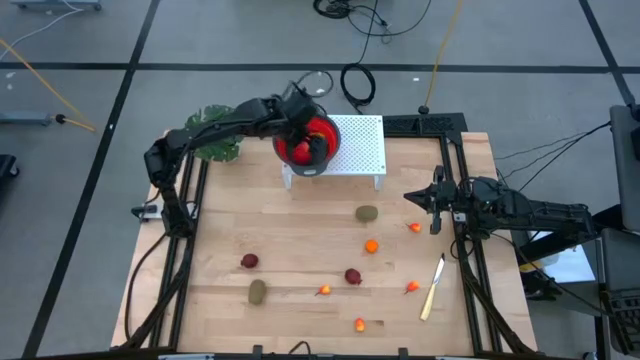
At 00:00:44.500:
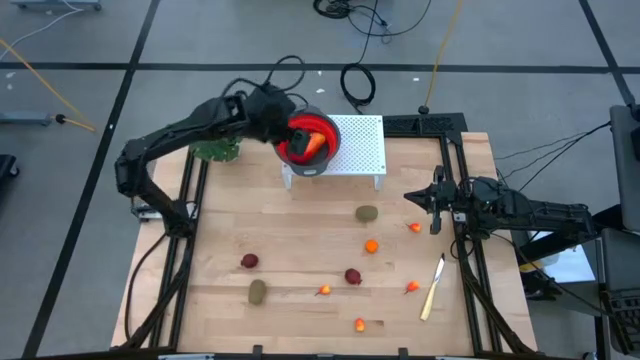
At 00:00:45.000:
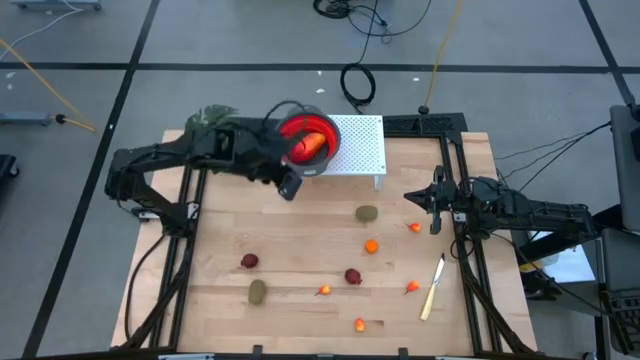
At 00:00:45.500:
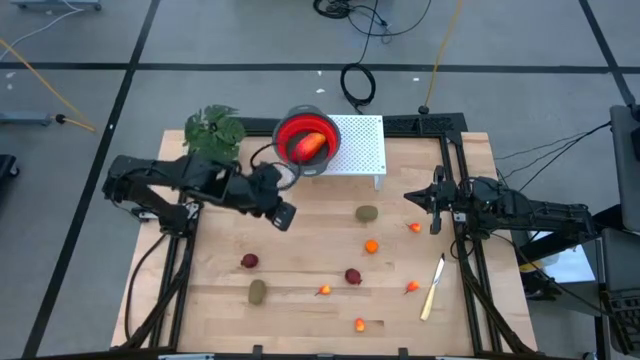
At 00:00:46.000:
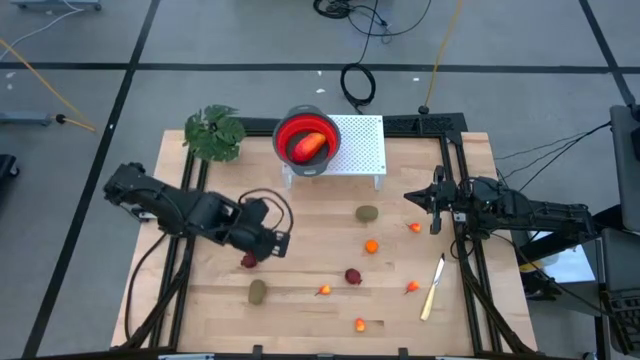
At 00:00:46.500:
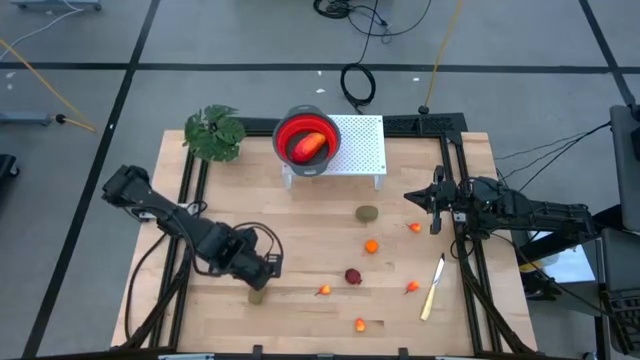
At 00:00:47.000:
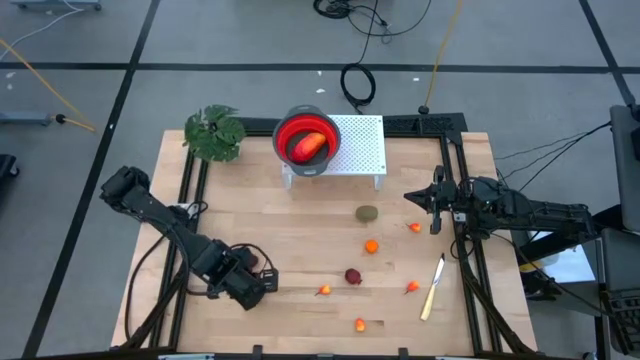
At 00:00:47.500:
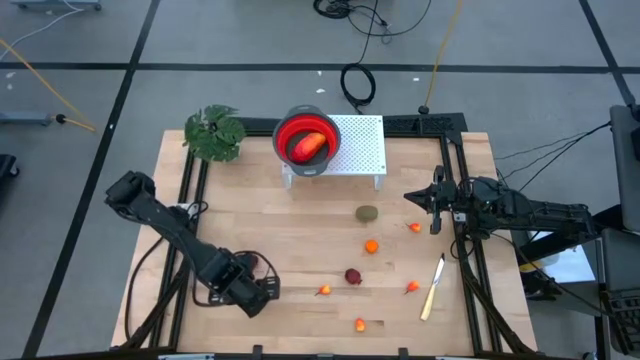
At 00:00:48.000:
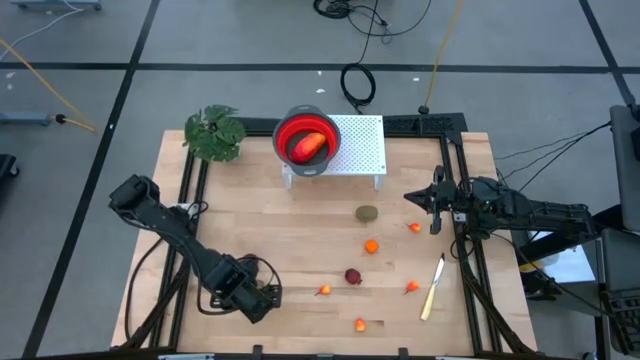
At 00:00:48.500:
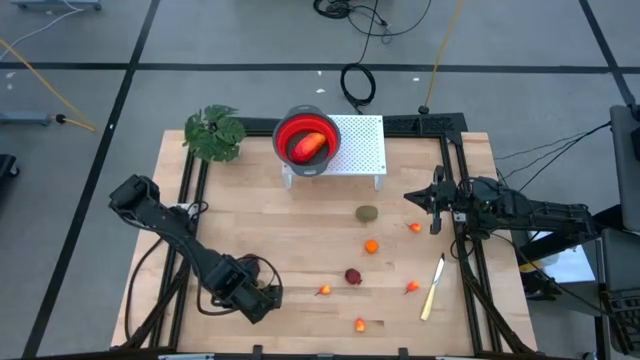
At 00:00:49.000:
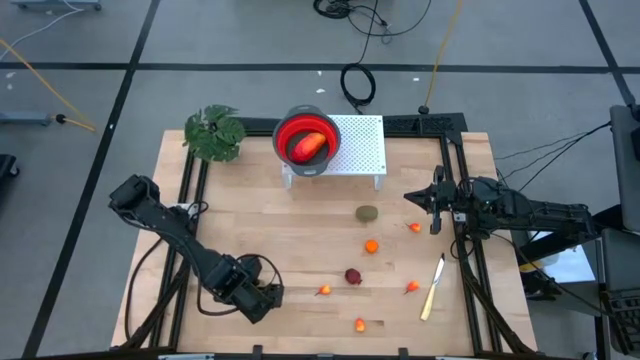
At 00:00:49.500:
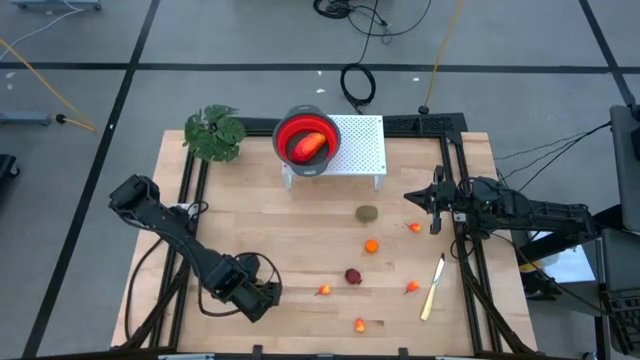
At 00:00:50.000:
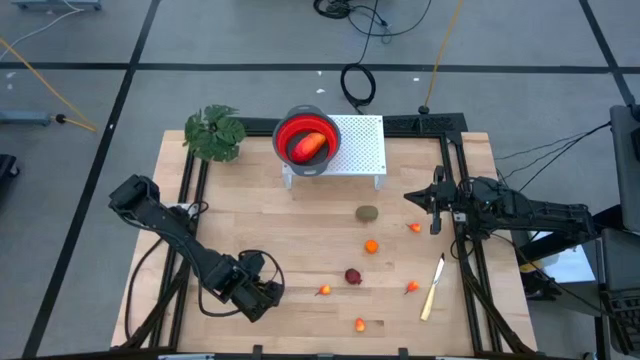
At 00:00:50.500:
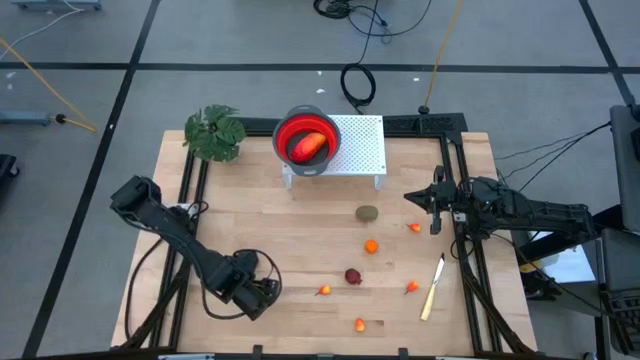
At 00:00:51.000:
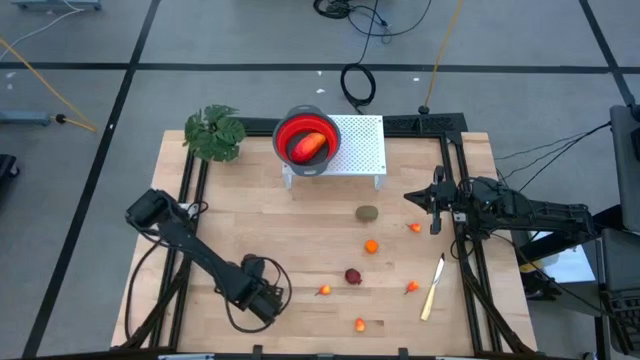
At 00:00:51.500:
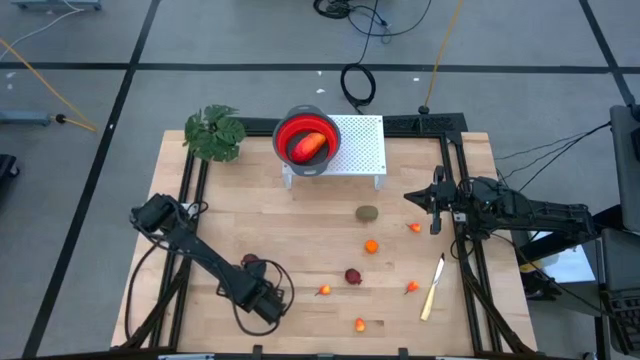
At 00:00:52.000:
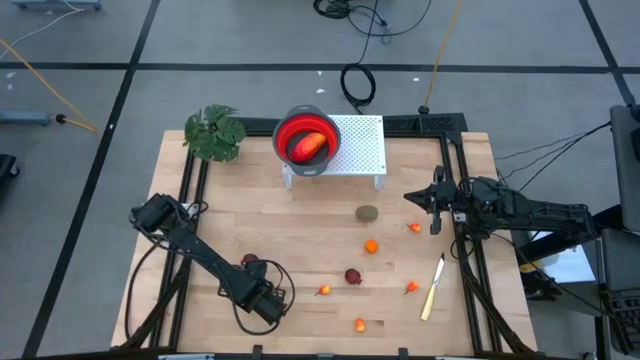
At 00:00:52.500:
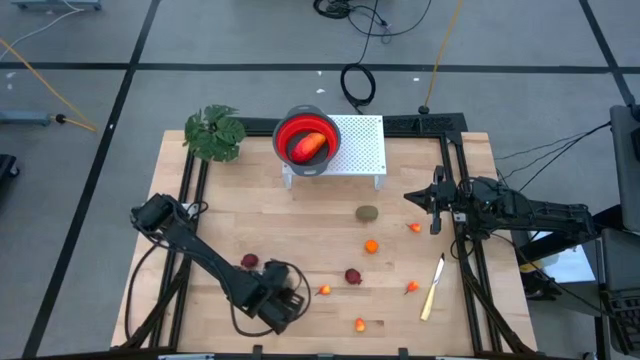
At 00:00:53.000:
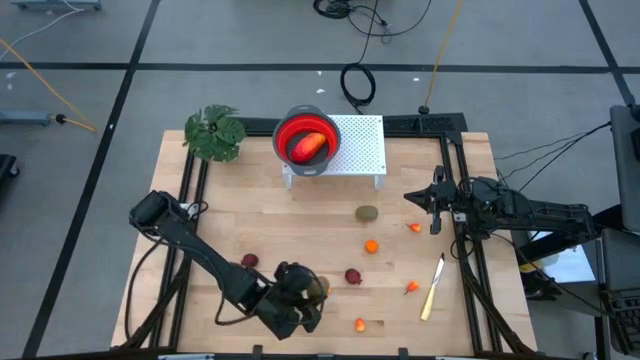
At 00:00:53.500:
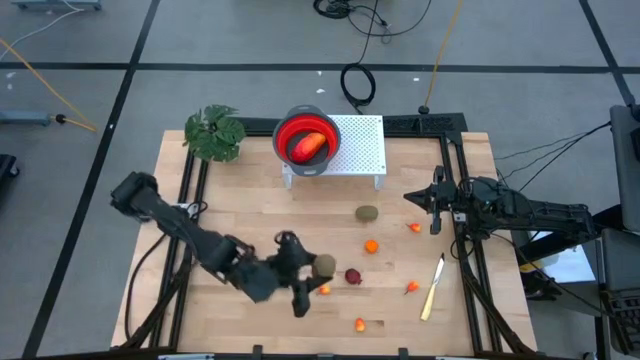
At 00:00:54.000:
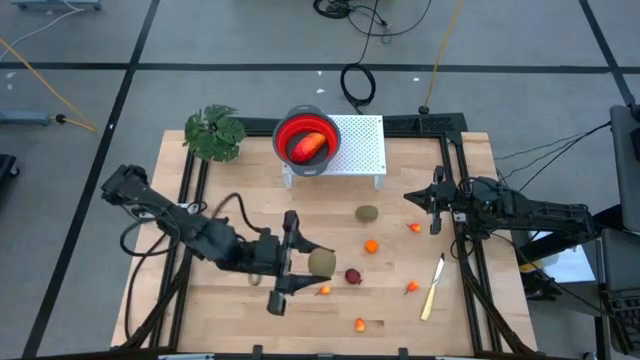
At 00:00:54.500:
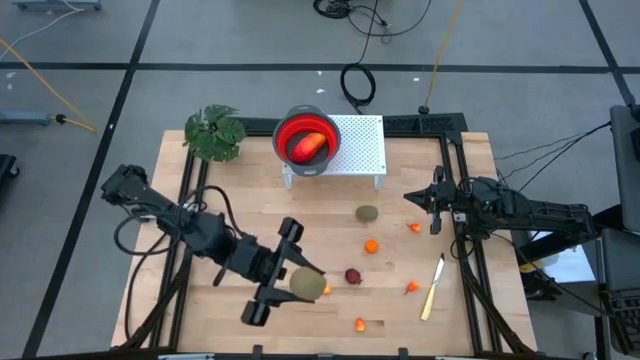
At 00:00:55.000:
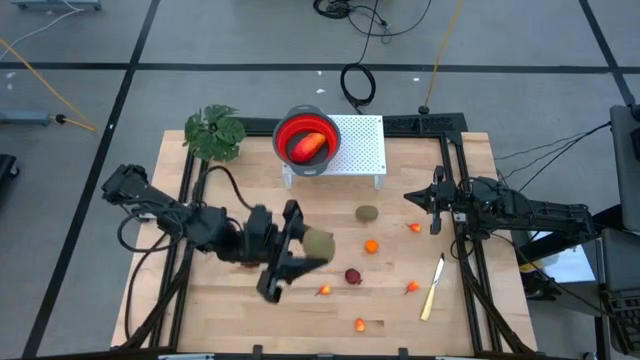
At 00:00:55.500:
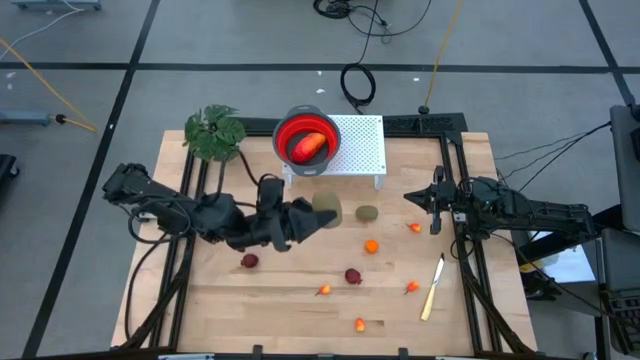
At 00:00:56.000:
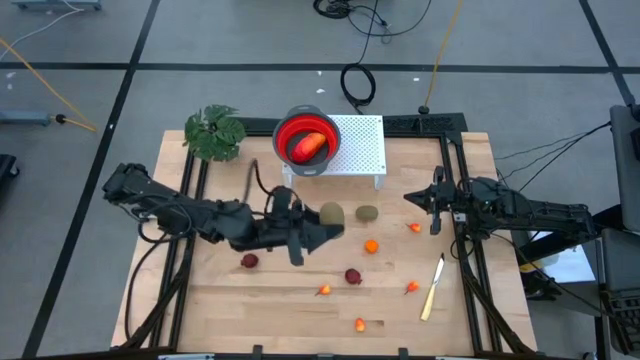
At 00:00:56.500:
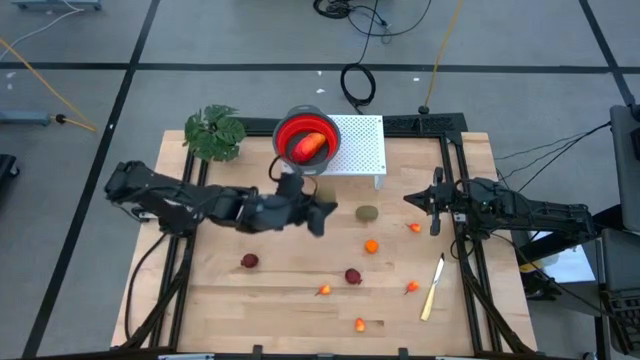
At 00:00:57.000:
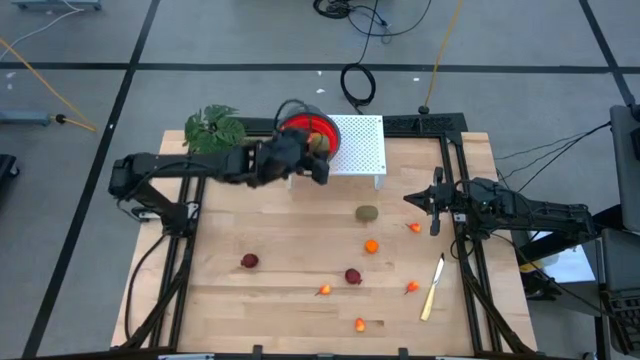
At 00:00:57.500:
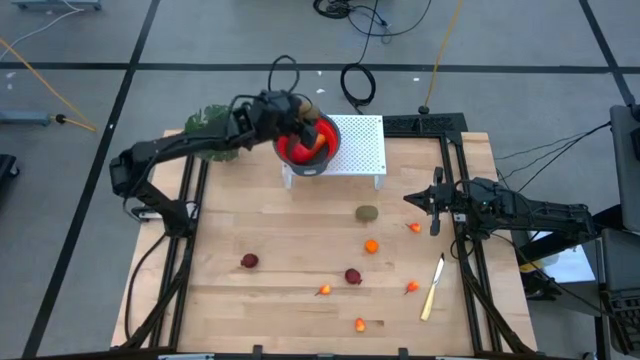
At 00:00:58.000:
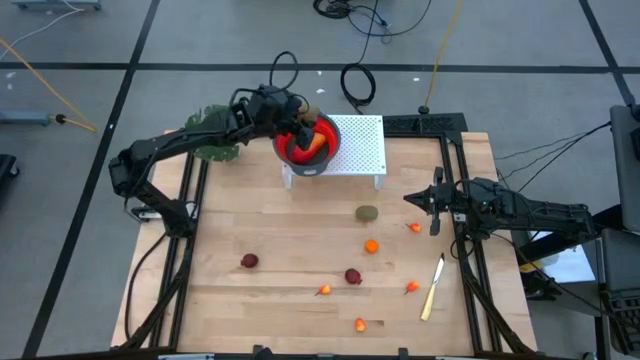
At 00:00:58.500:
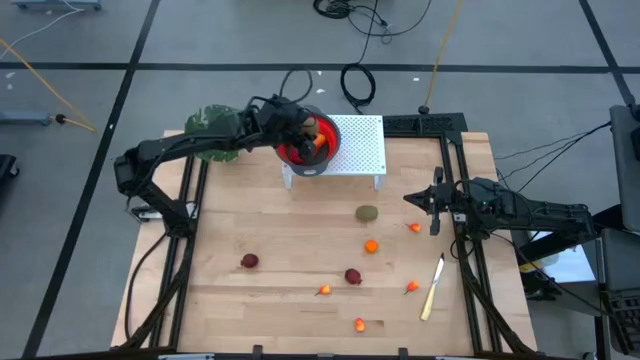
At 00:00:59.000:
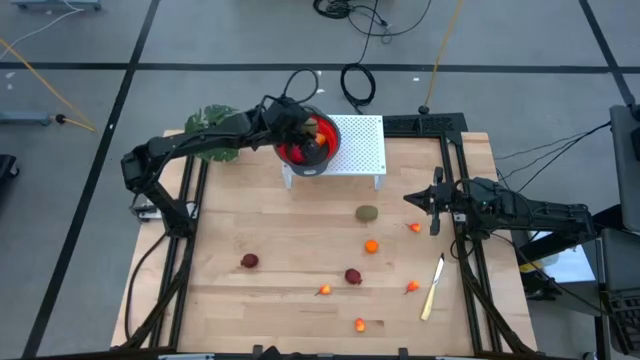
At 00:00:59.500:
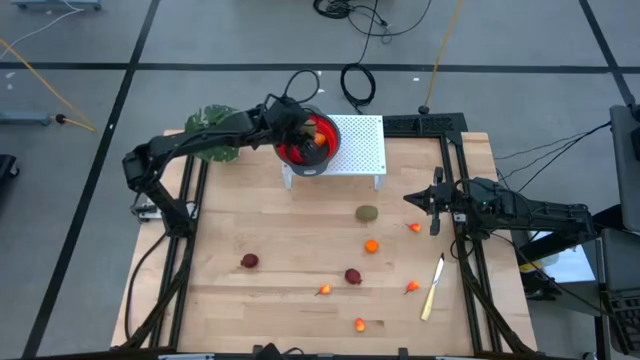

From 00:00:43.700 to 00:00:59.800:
Task: Pick & Place Fruit
Put the bottom left kiwi into the red strainer bowl

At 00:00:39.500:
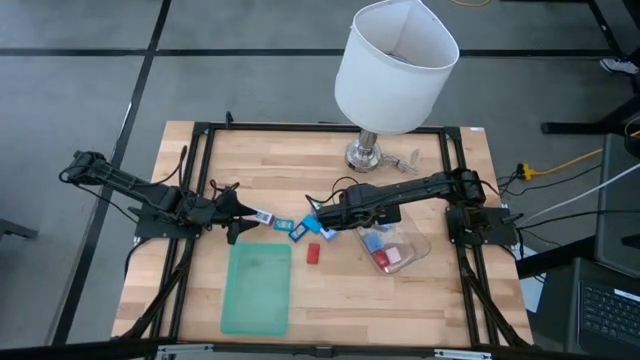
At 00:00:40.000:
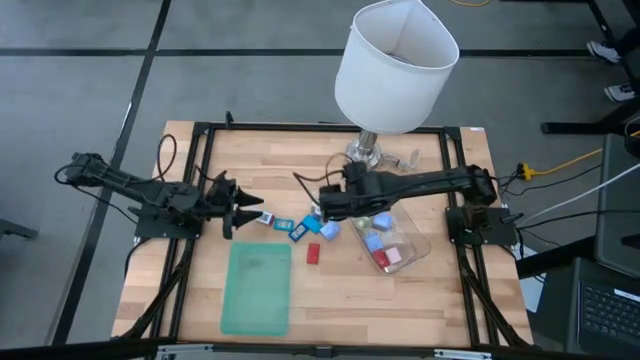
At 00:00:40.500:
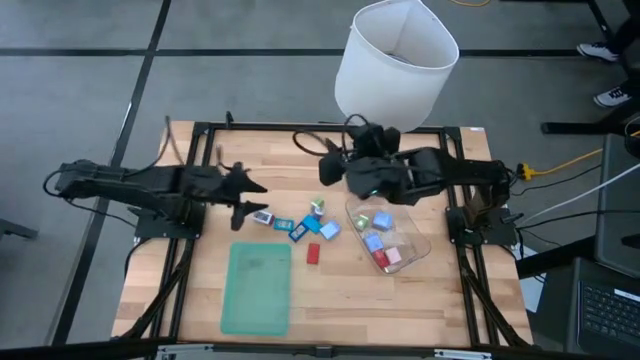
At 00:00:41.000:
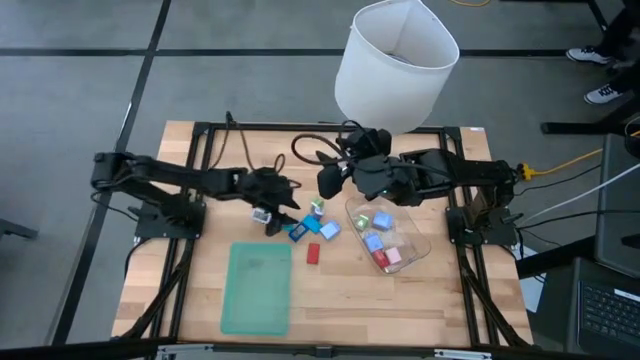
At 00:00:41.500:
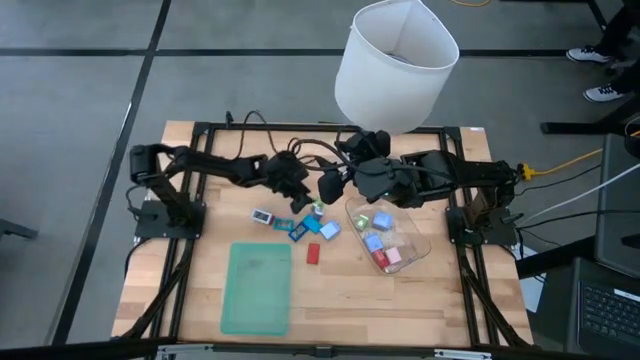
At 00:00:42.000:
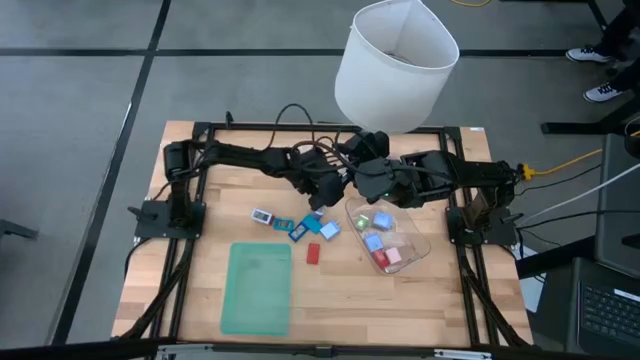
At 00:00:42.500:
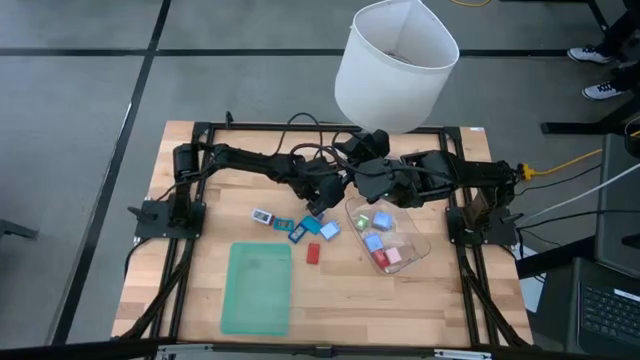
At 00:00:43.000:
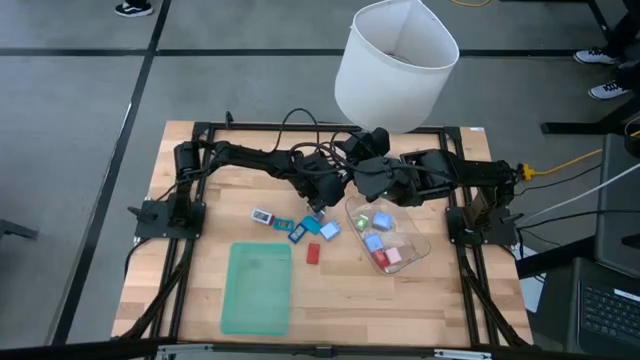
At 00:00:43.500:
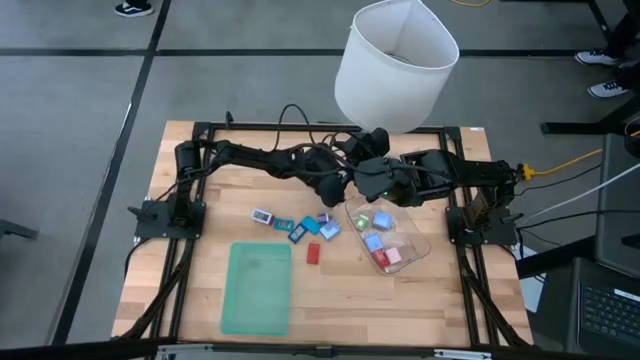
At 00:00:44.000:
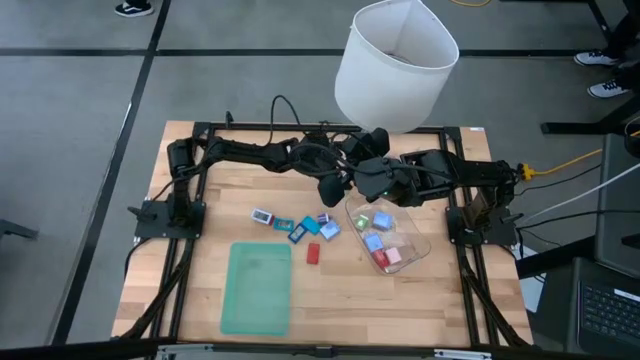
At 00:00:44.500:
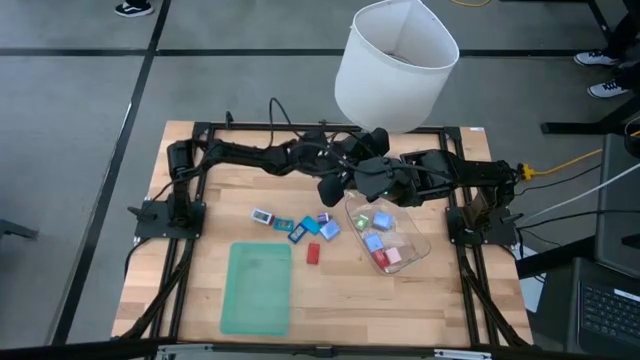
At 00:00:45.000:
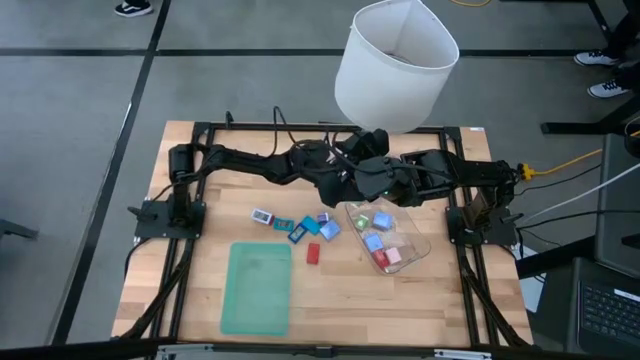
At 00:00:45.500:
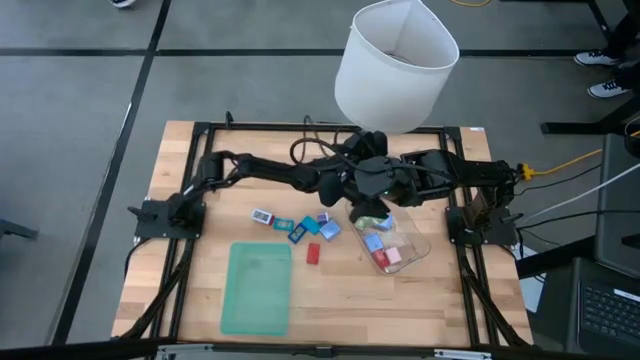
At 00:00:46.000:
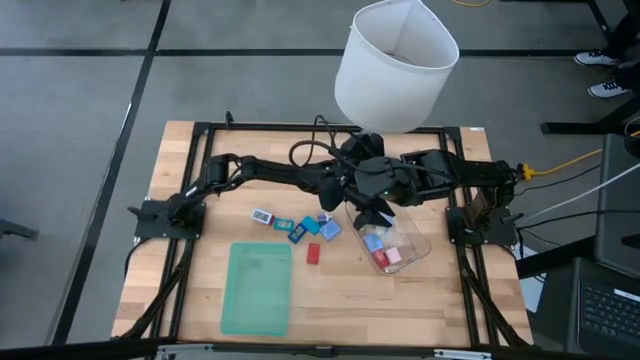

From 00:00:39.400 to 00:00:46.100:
Task: Pick & Place Office items
Put the green charger adapter into the transparent bin
